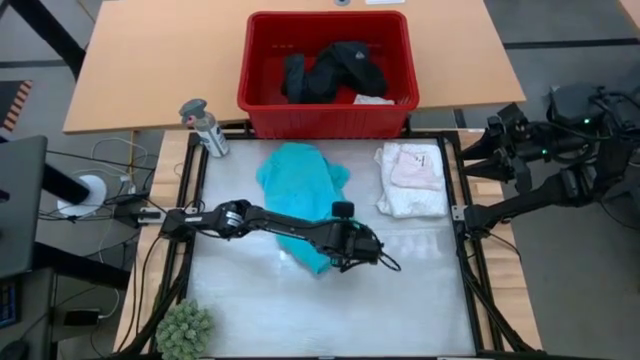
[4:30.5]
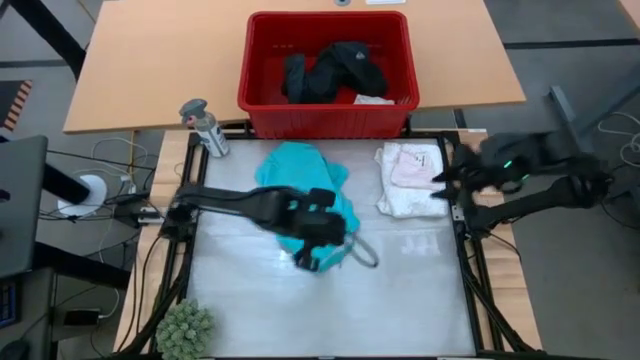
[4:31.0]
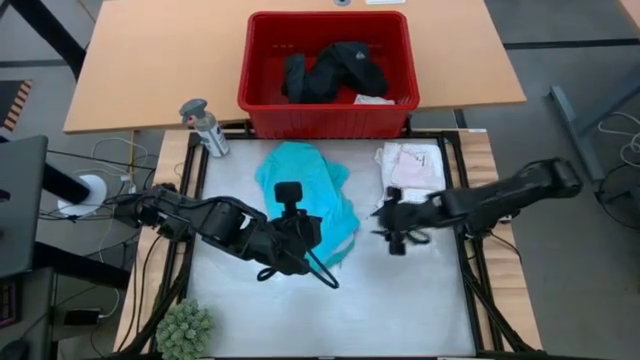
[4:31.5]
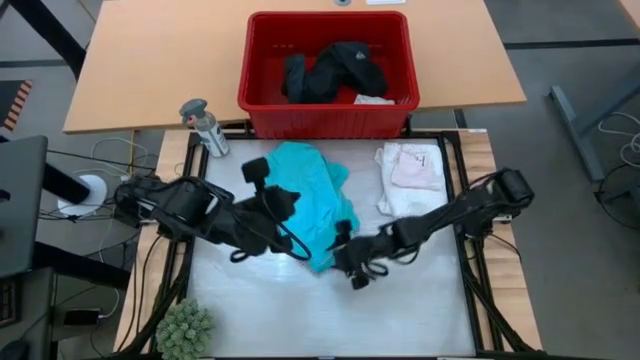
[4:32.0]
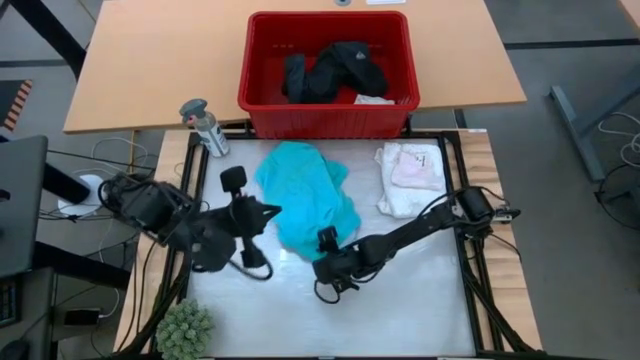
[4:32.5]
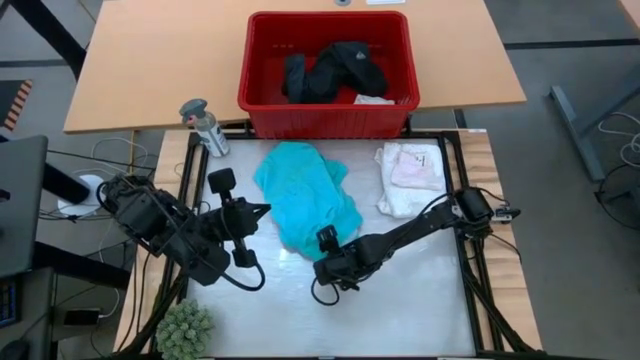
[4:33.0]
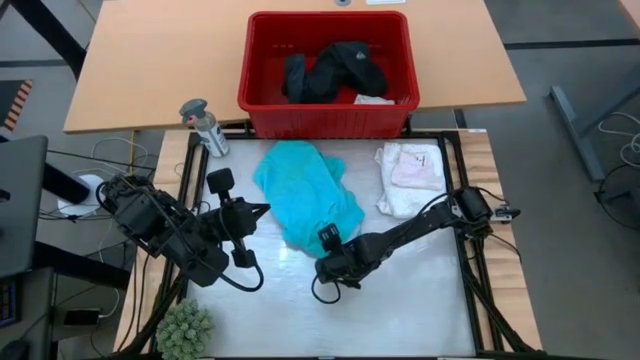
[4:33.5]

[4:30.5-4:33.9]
Task: Fold Laundry from Bin
Fold the light blue shorts

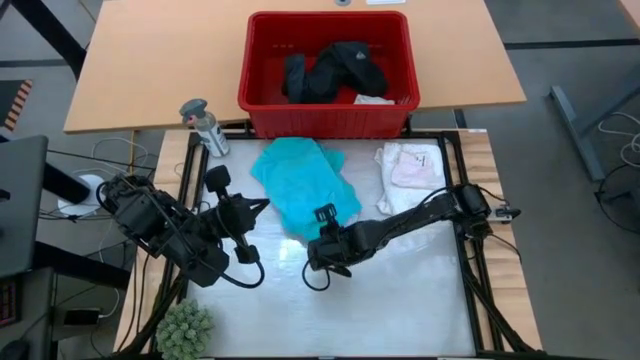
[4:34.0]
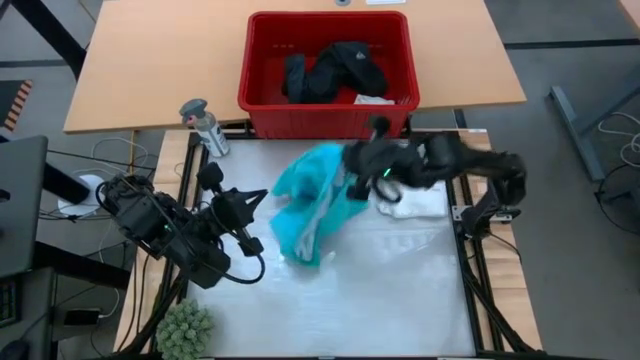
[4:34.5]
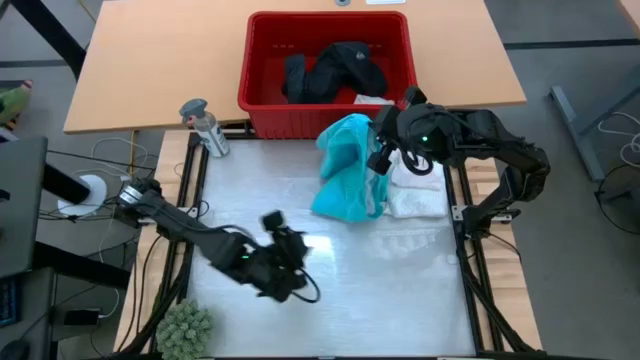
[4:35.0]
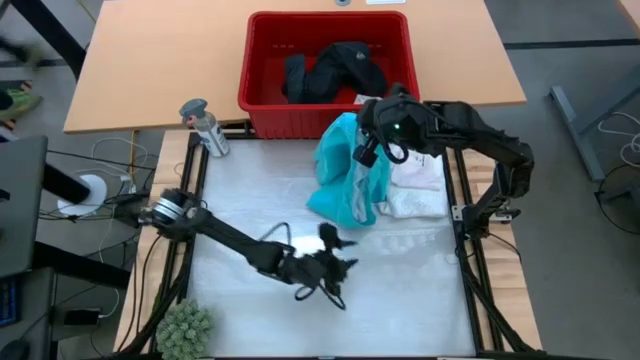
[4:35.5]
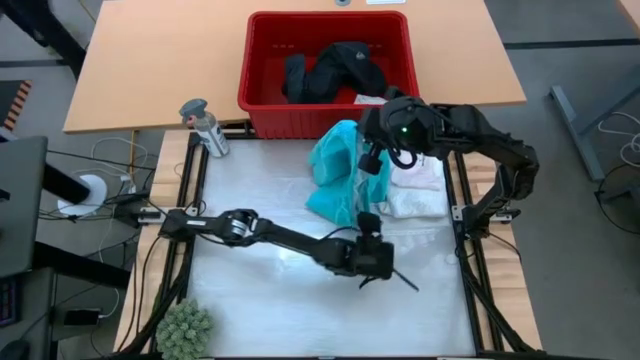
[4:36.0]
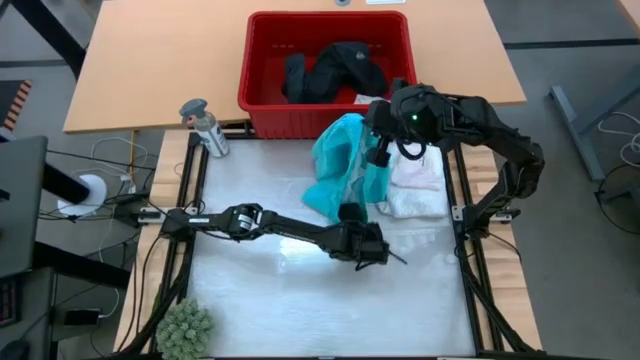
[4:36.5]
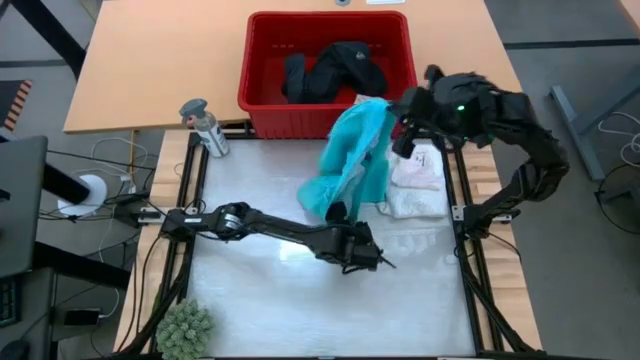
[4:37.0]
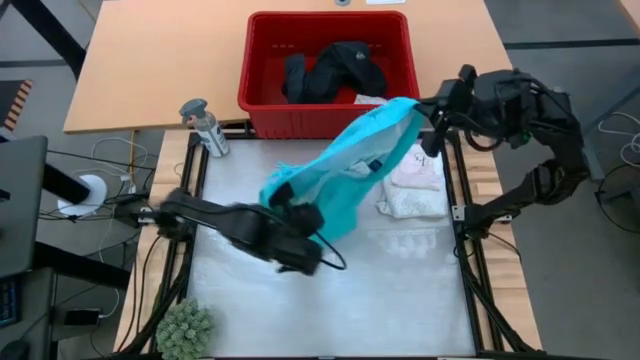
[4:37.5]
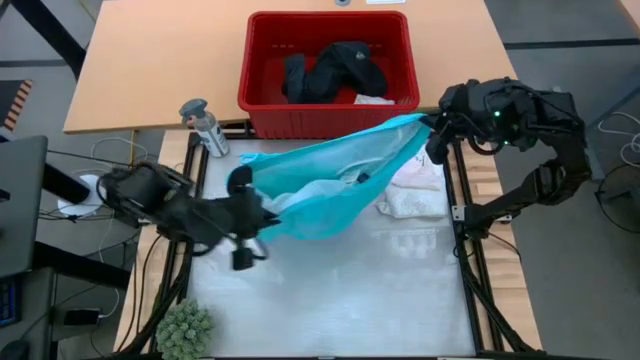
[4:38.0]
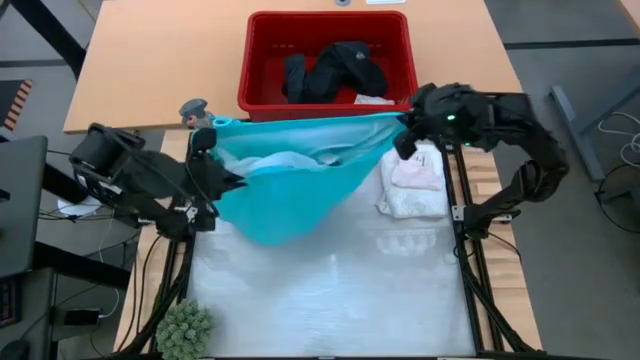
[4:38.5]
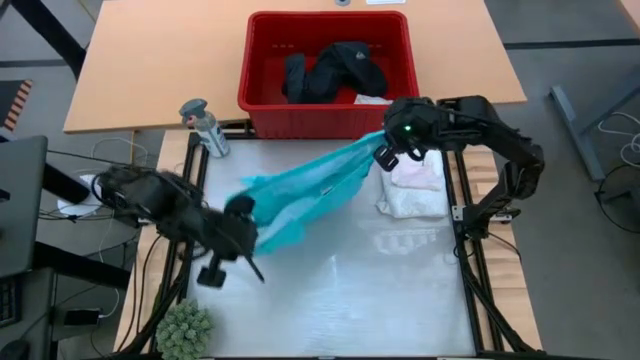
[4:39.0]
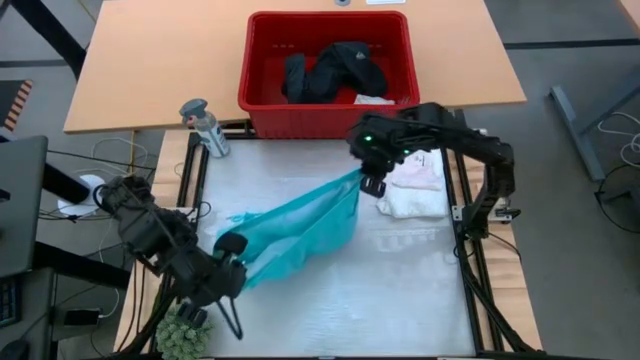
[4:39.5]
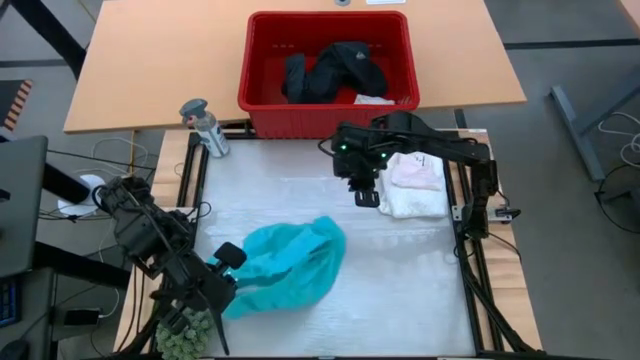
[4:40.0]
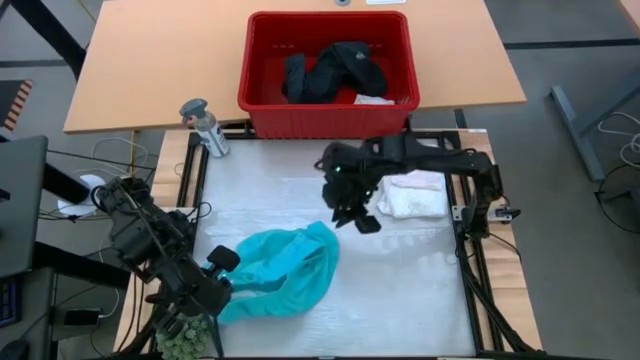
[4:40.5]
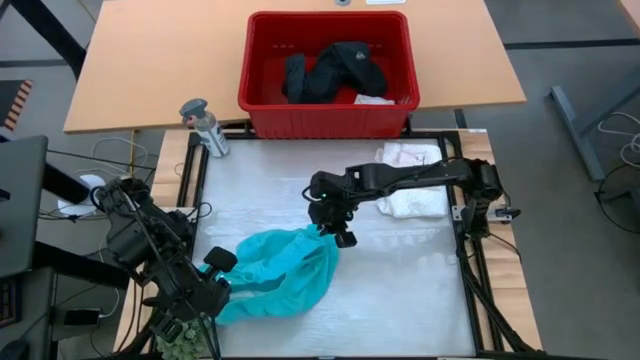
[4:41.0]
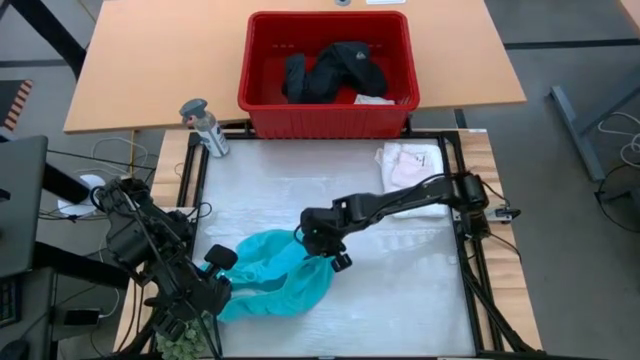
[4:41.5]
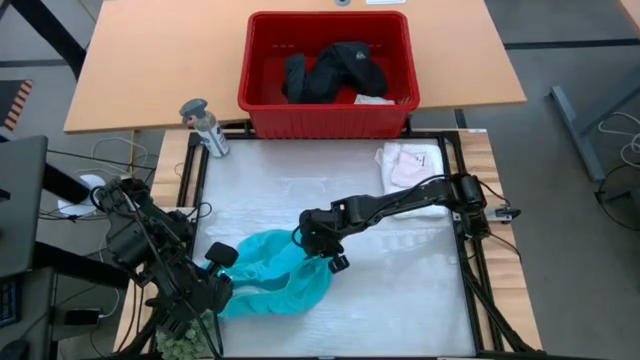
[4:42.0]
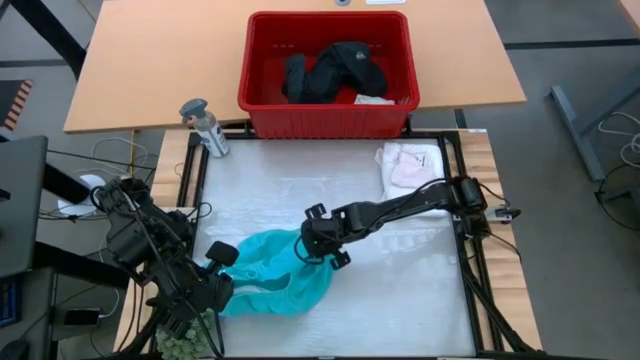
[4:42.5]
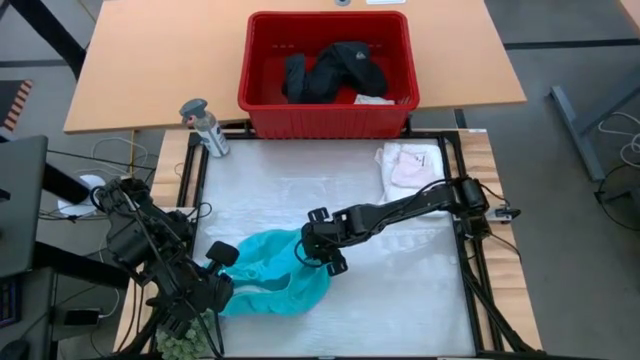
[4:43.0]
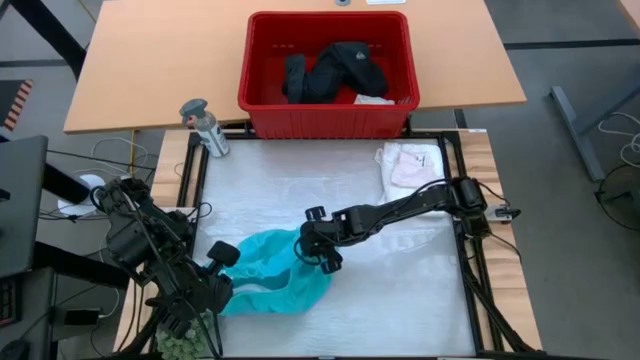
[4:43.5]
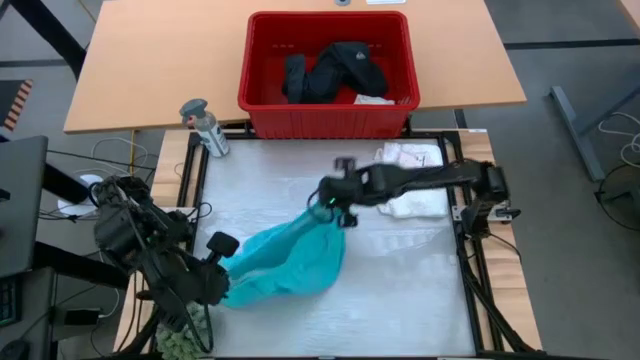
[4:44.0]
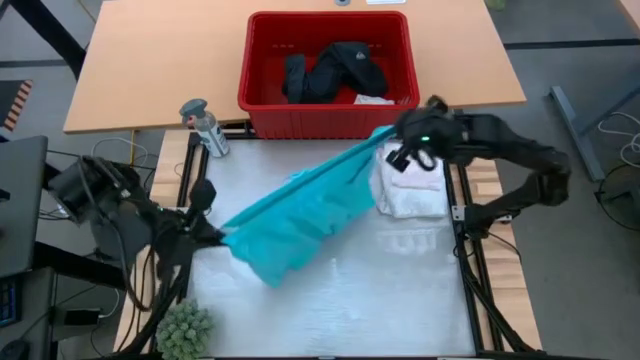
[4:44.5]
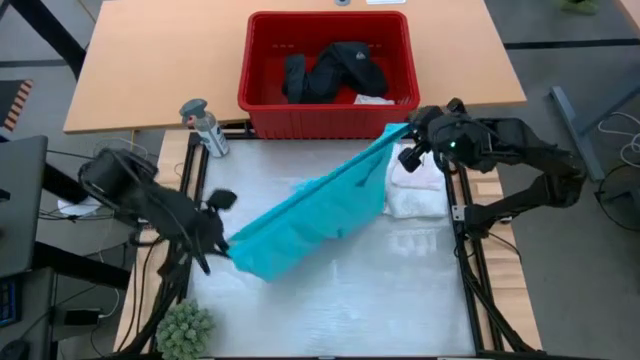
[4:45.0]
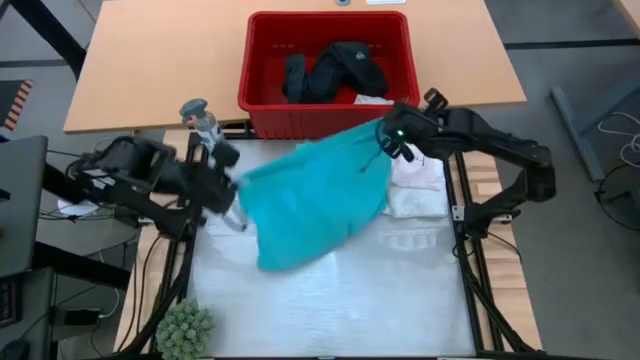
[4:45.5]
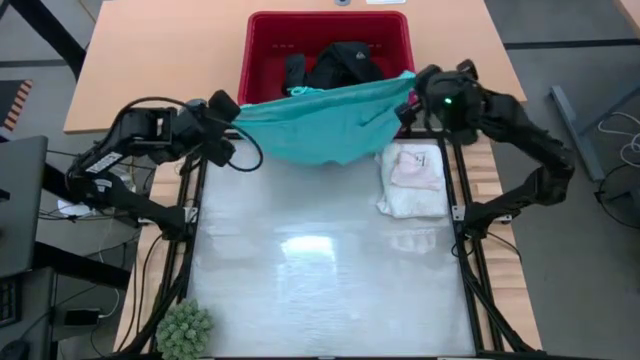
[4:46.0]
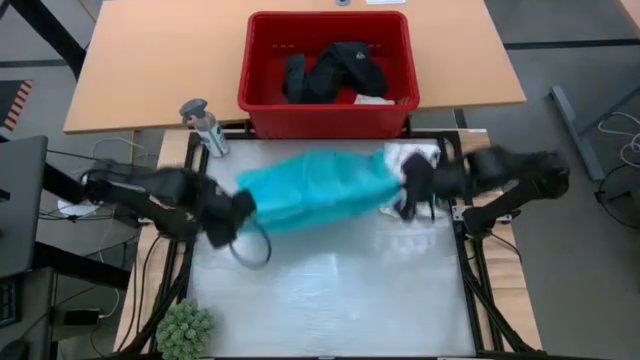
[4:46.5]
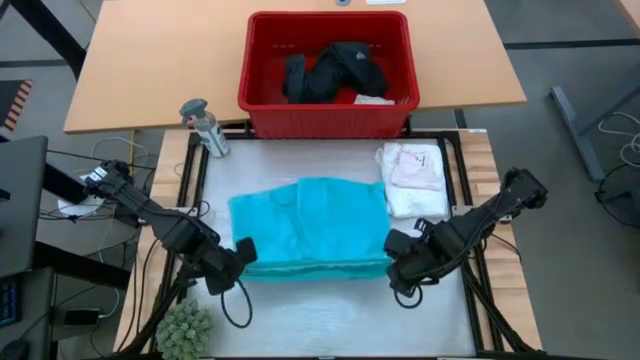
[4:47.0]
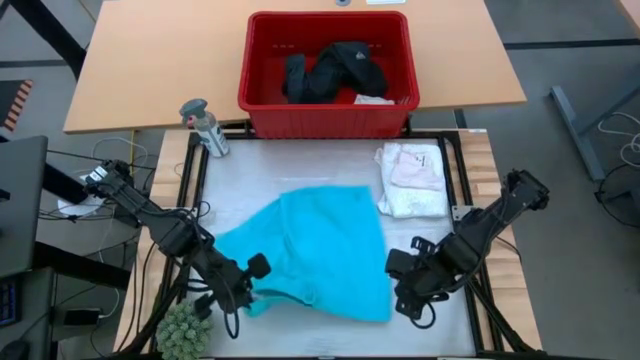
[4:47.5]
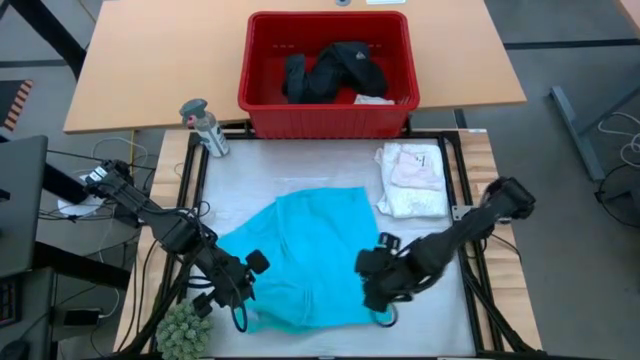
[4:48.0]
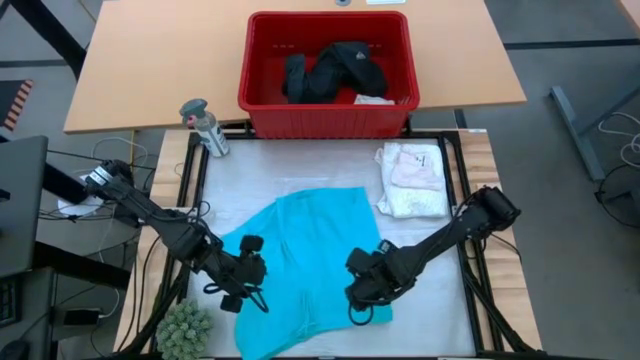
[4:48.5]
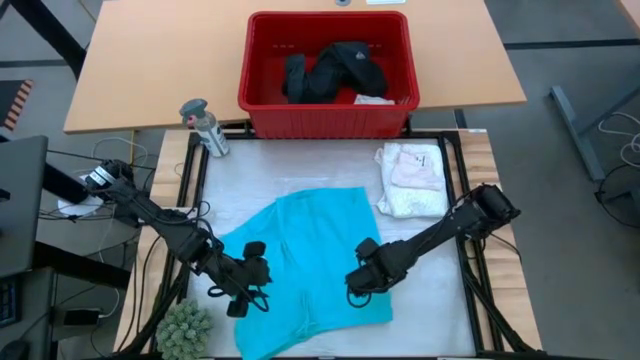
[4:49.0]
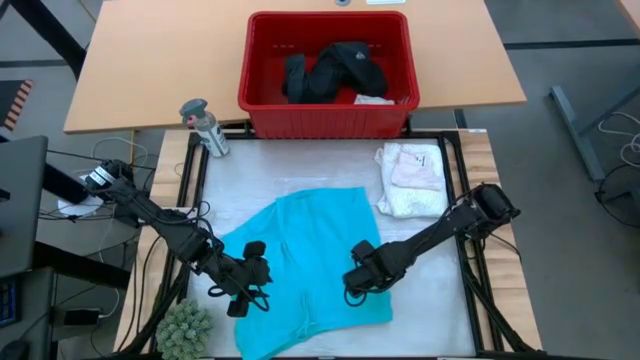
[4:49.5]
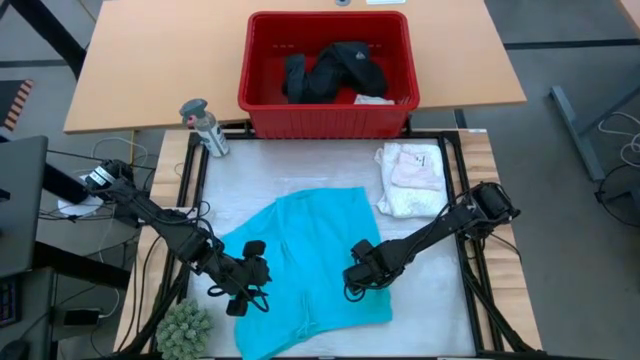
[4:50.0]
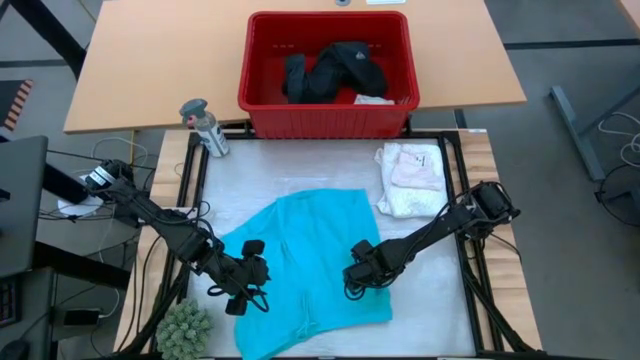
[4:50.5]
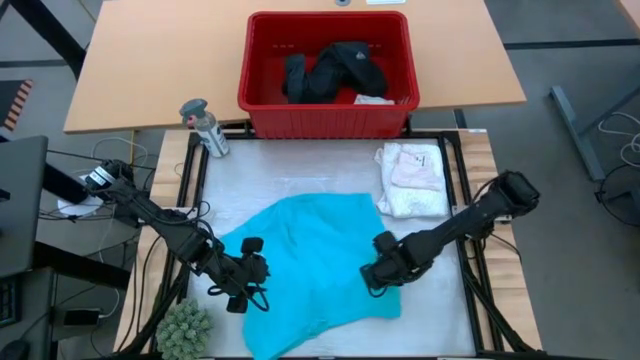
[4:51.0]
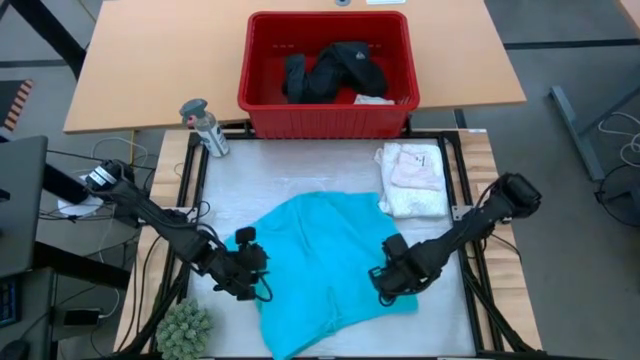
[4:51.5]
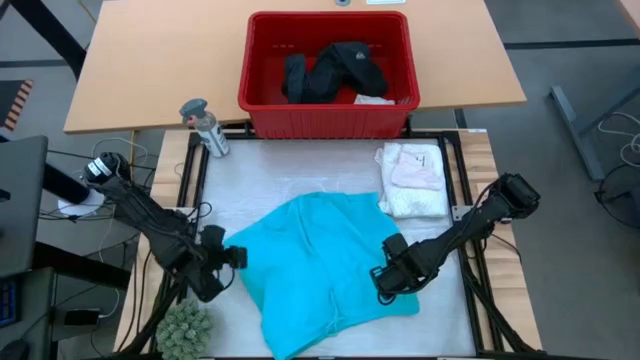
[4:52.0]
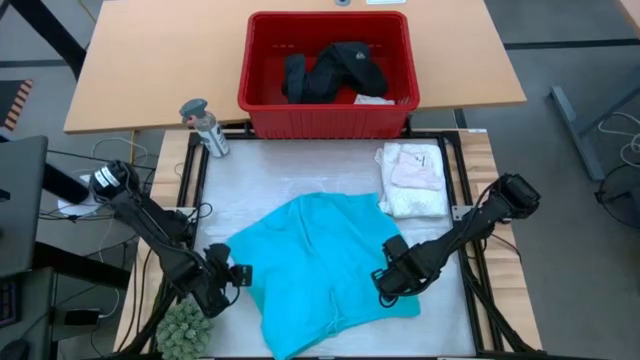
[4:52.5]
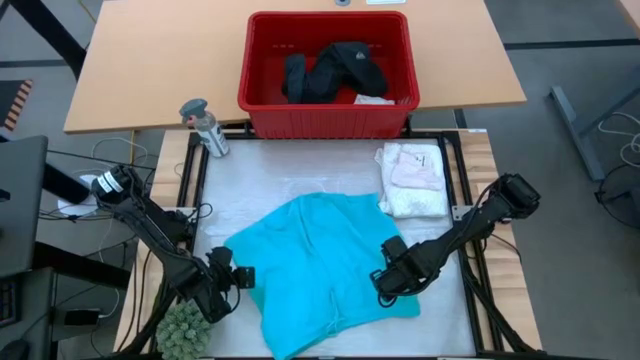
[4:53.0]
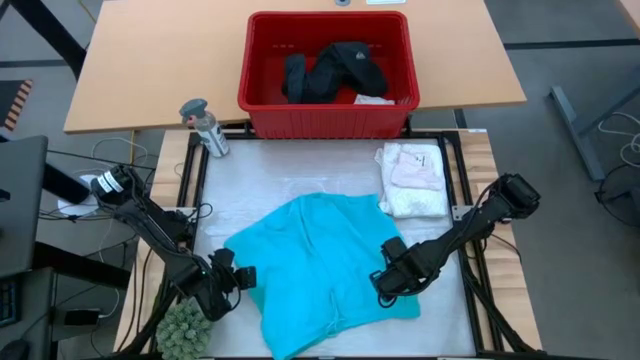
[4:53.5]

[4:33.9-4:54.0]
Fold the light blue shorts
